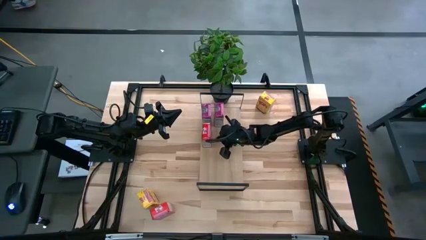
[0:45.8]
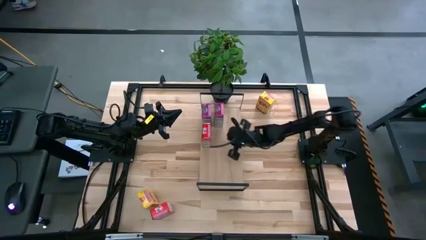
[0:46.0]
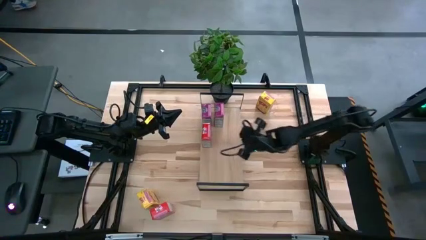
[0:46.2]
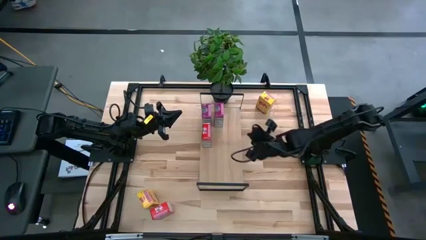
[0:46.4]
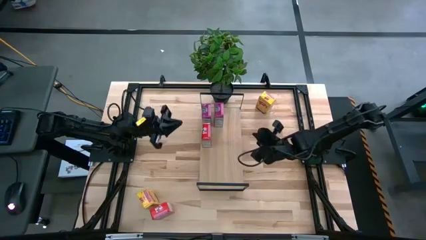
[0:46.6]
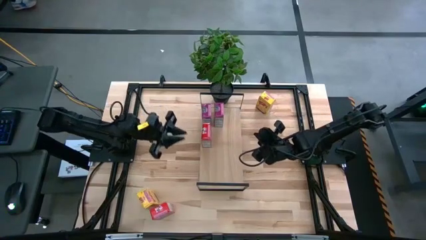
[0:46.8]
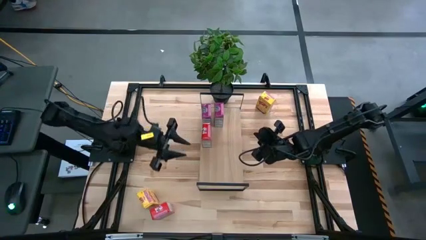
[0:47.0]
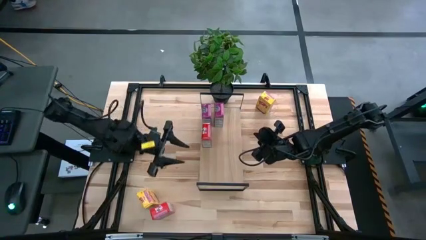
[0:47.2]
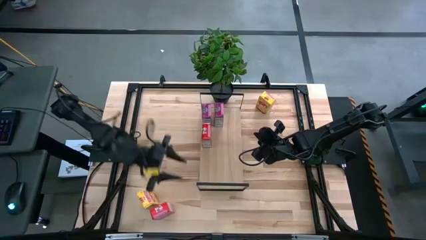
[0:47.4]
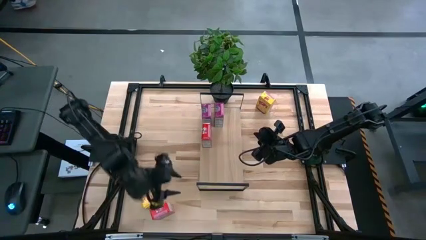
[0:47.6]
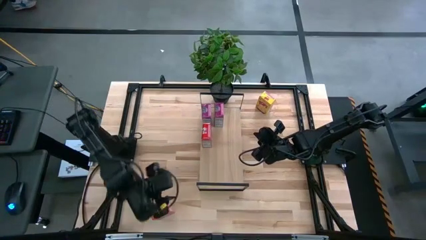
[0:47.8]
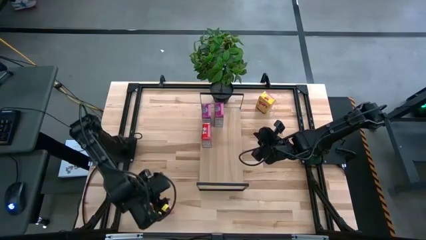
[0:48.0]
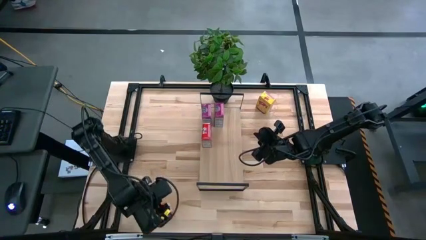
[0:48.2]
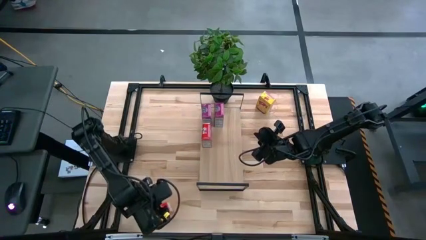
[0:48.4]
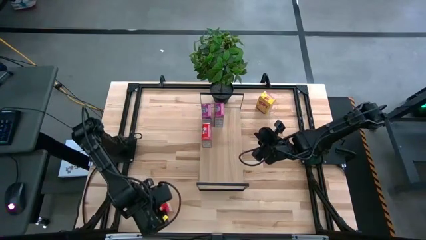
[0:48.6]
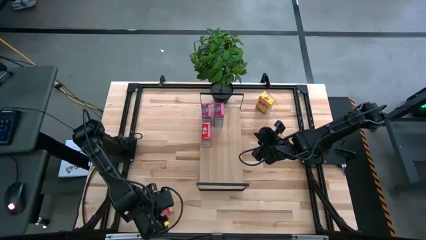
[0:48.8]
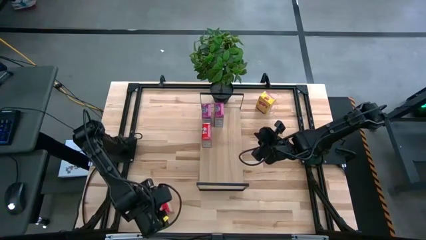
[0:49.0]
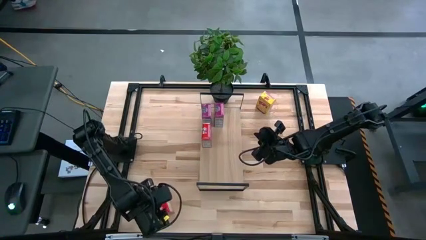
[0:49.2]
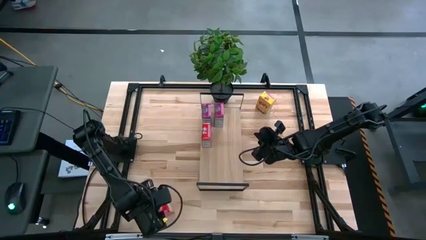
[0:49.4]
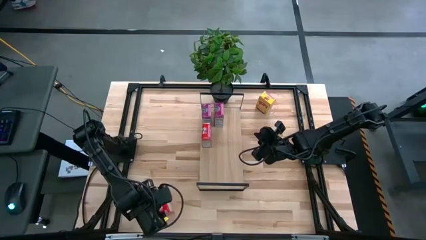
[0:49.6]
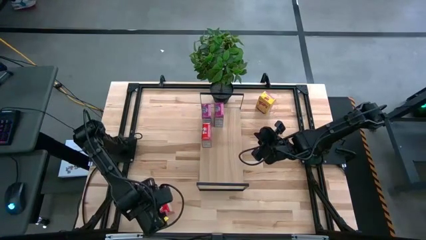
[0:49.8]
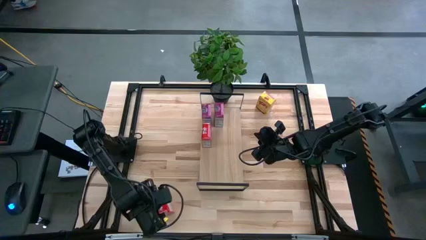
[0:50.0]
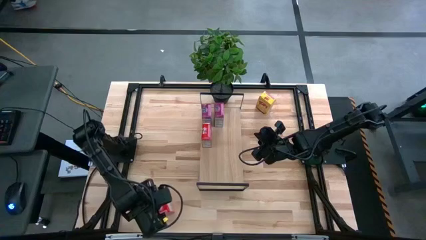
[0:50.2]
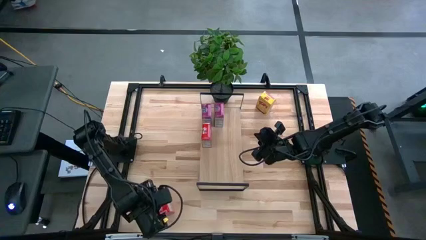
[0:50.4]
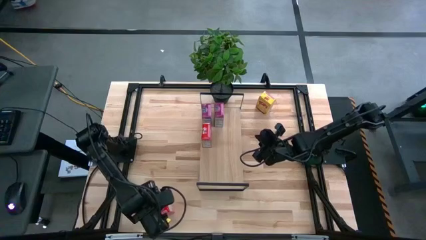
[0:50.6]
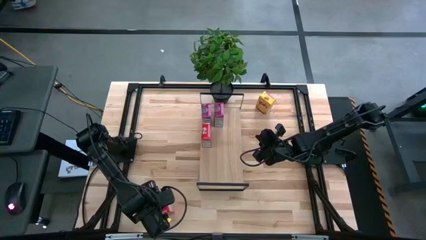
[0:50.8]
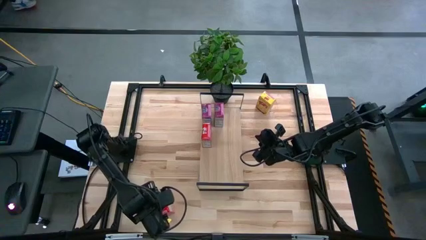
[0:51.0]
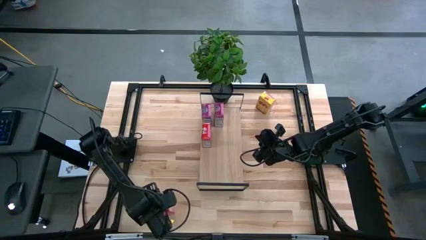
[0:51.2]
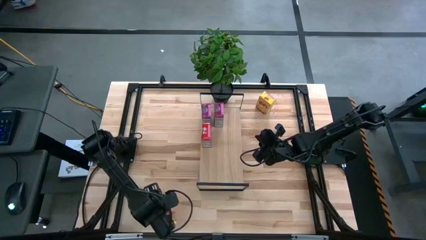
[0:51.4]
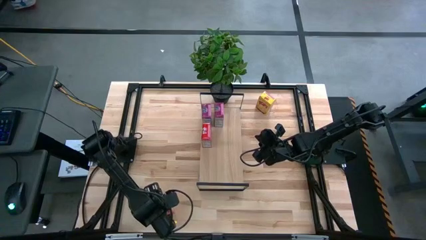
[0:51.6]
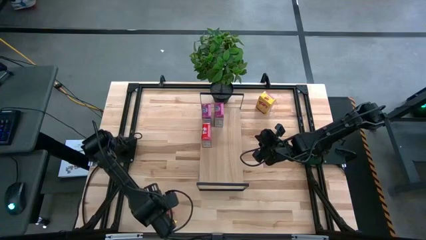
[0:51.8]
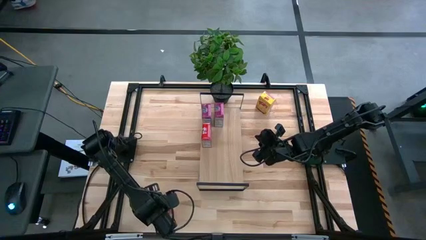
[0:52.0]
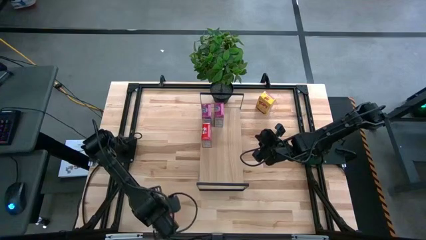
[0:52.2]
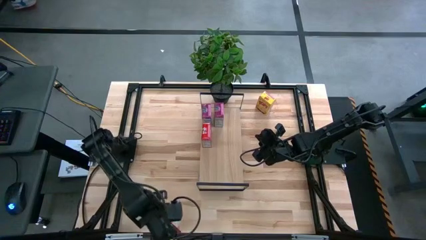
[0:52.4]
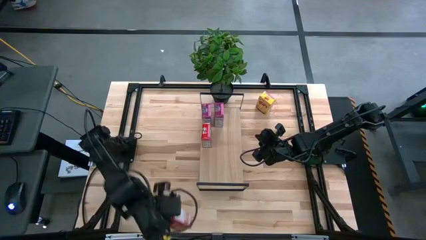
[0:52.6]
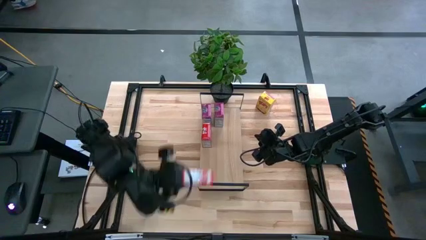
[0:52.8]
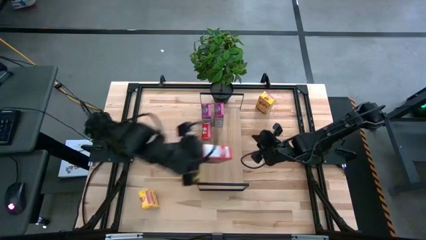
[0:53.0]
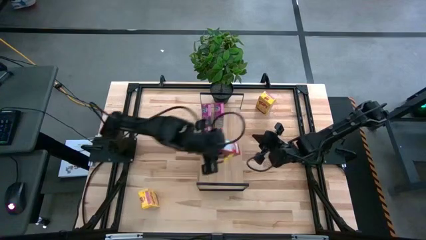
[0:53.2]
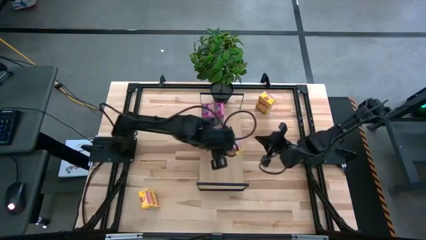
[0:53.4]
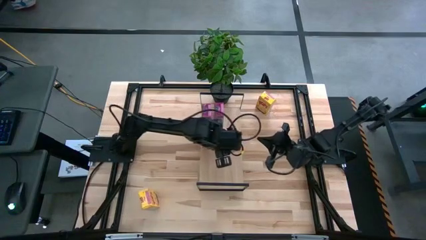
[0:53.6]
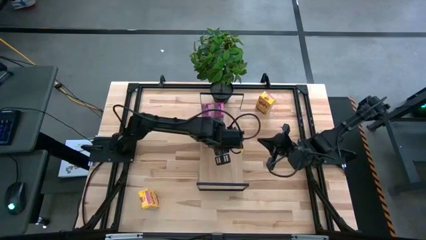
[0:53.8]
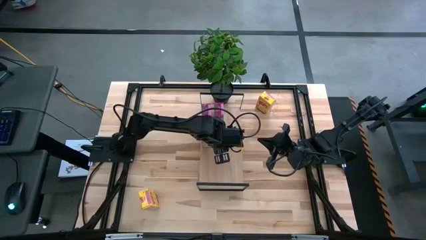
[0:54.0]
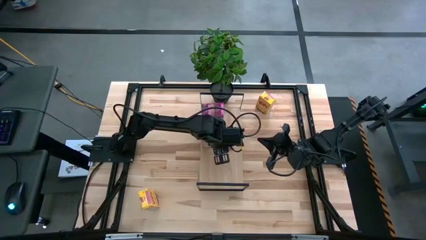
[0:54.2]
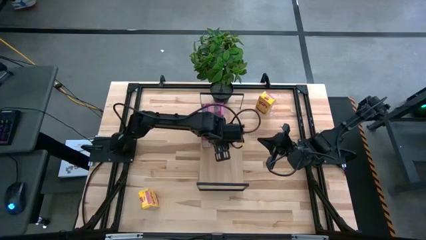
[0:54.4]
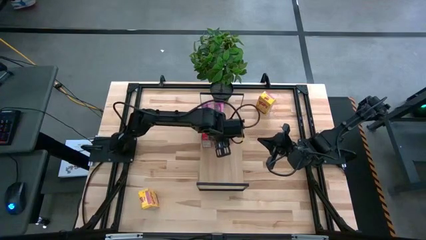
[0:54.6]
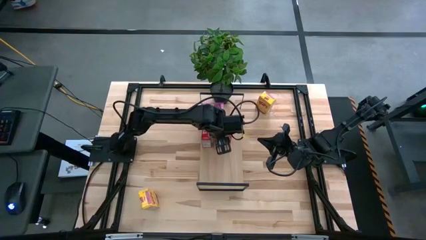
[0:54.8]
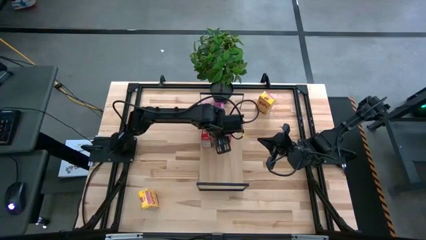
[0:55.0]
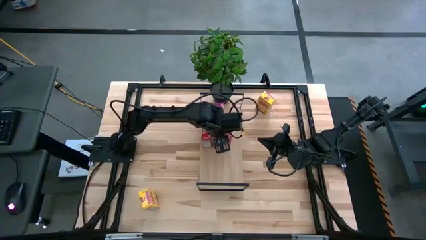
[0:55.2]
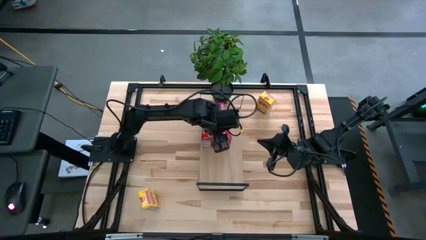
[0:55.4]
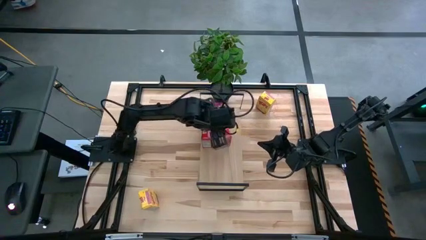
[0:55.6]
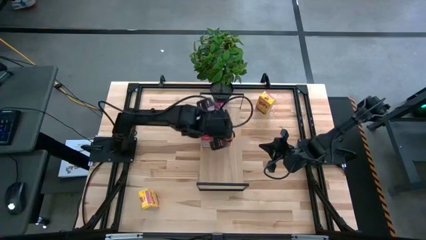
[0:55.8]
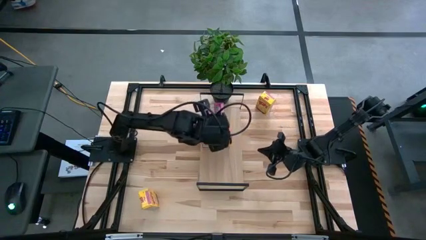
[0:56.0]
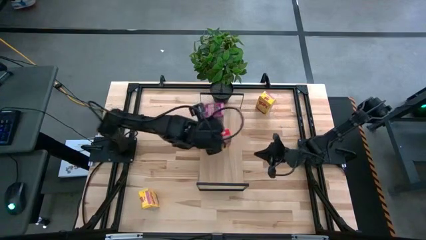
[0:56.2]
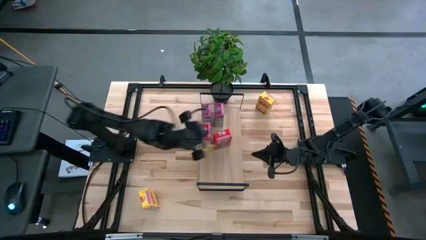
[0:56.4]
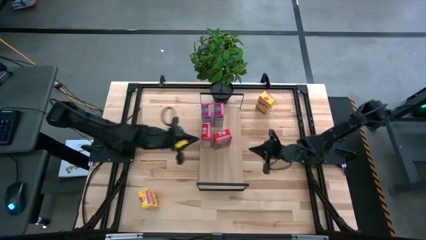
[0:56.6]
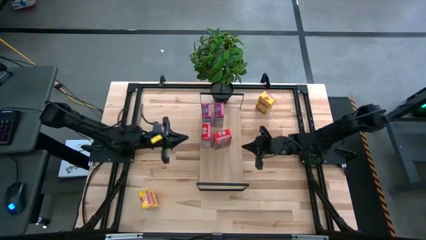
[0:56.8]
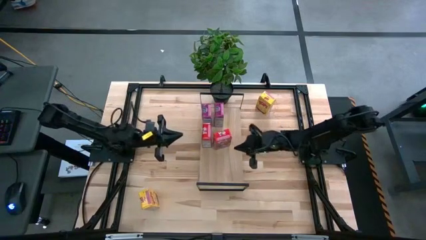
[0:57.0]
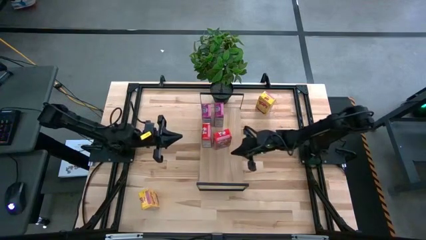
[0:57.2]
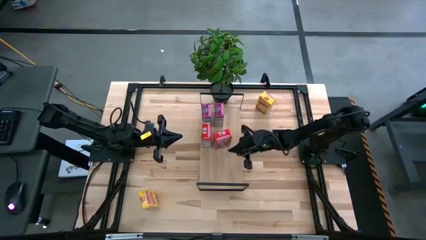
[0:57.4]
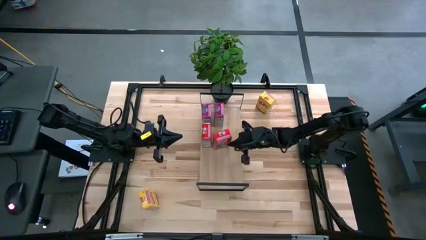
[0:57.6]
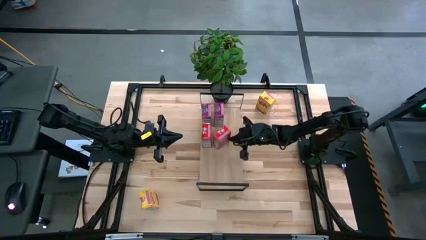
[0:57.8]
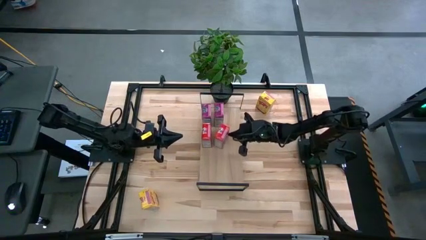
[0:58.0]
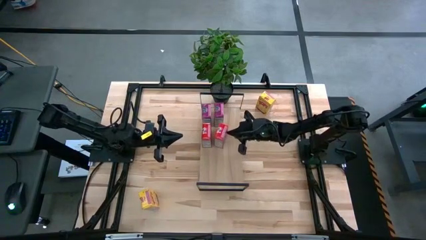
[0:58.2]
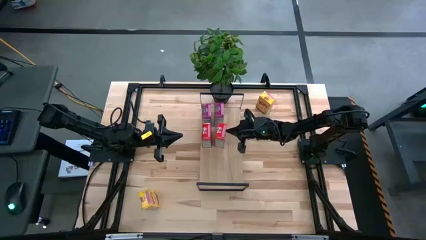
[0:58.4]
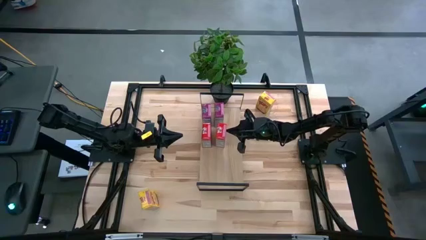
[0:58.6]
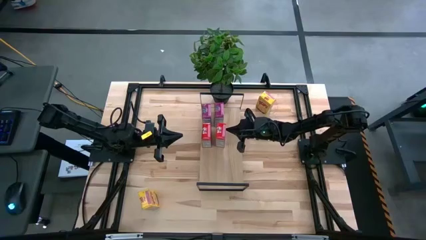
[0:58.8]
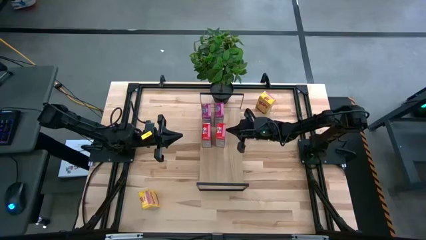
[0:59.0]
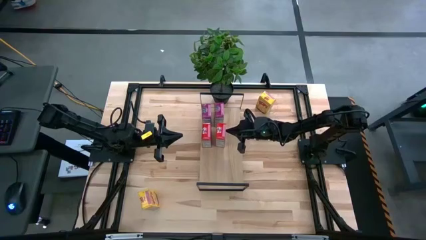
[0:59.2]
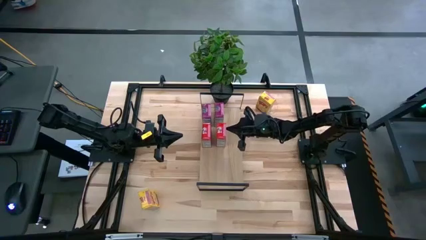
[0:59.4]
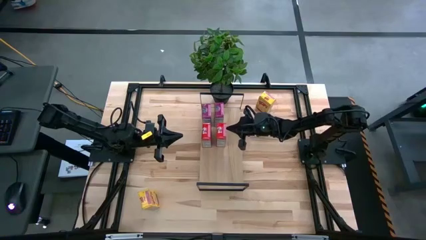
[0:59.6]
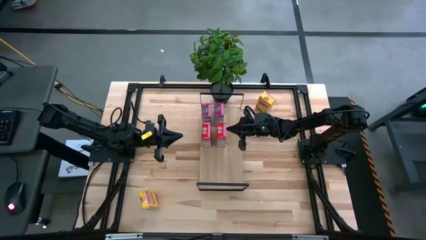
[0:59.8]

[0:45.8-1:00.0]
Task: Stack cereal on shelf
Put the red cereal box on the shelf aligned with the other red cereal box

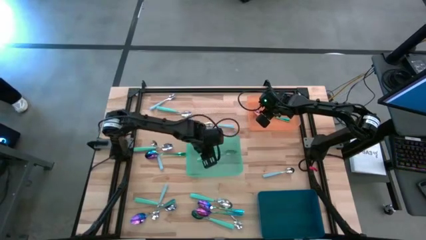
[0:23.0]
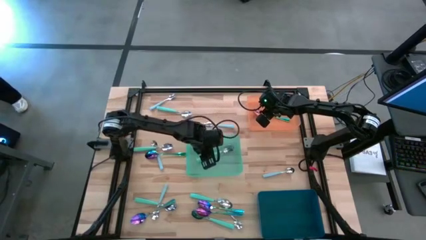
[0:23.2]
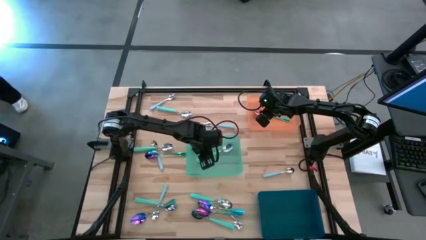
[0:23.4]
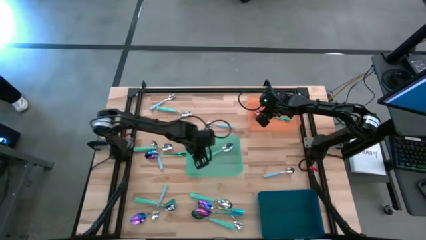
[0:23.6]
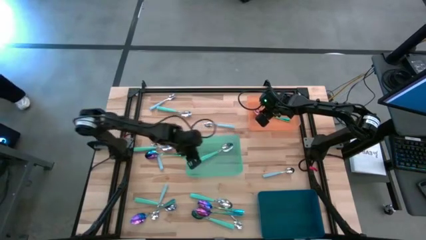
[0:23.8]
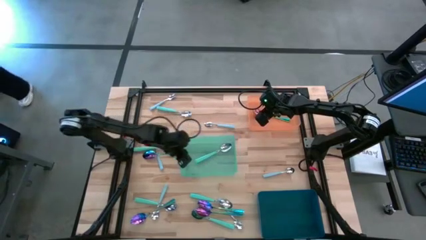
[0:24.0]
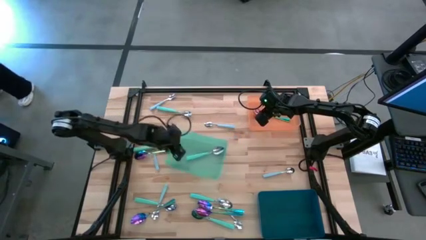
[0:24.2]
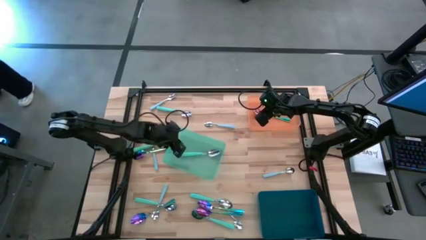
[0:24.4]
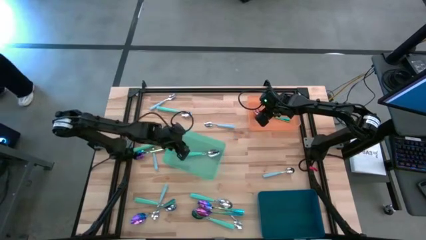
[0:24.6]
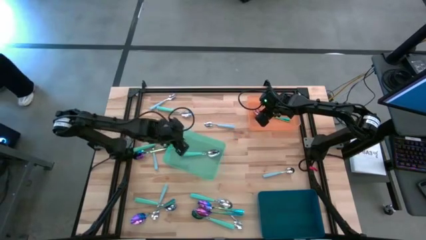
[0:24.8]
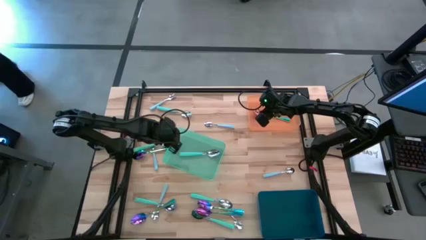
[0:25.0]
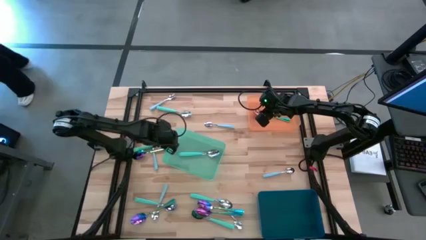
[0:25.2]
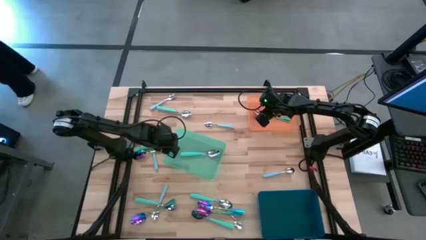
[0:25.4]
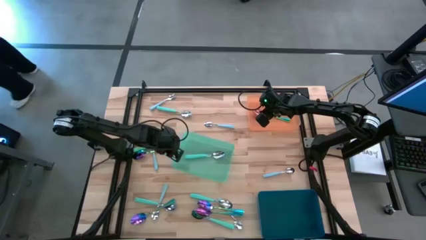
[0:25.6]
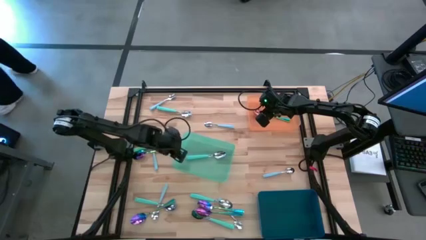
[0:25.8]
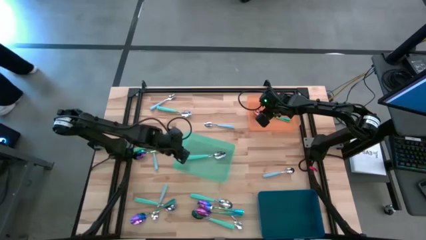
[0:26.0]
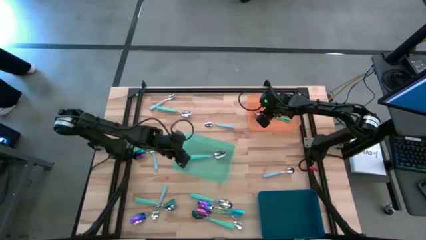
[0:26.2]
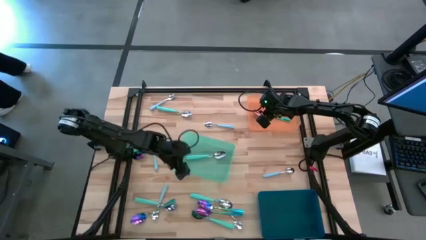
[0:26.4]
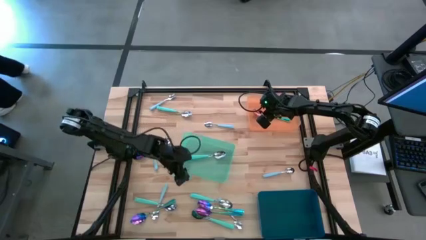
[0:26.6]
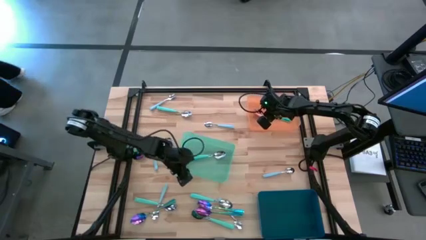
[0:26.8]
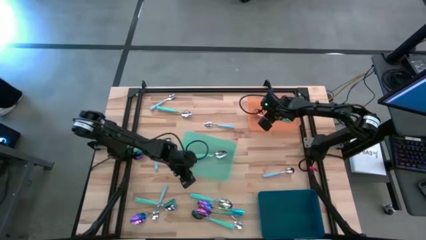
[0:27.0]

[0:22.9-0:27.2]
Task: Sort silverware by color (type)
Adjust the green bin
